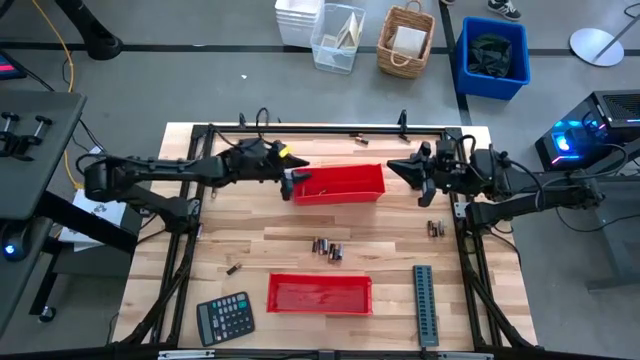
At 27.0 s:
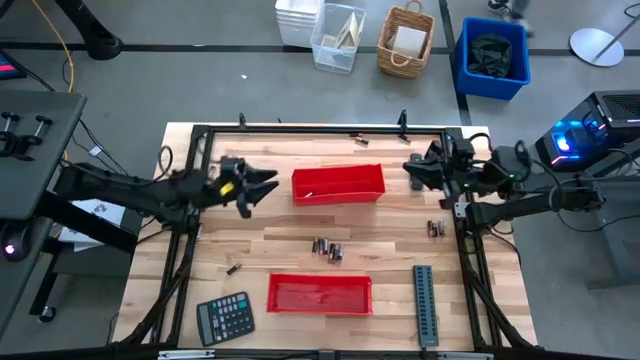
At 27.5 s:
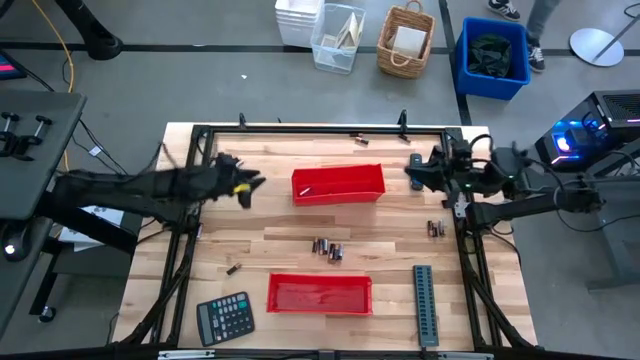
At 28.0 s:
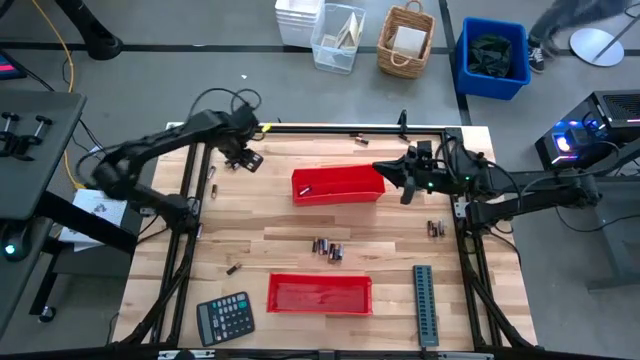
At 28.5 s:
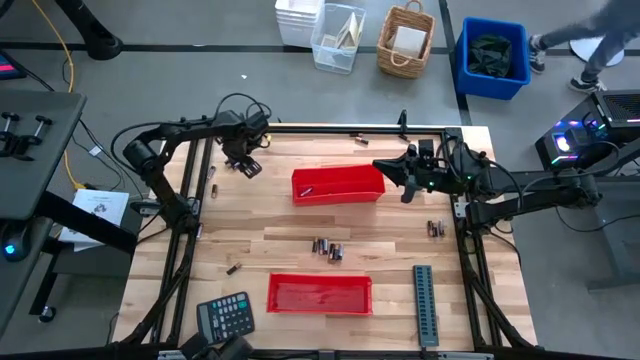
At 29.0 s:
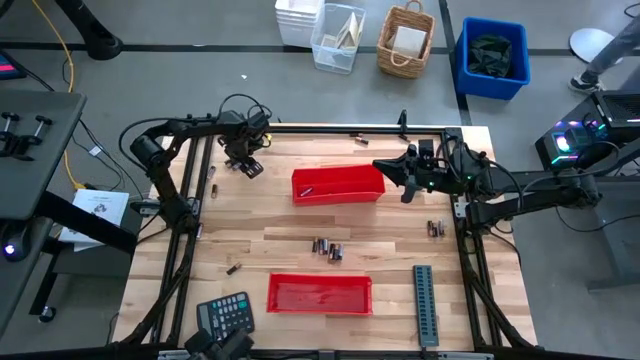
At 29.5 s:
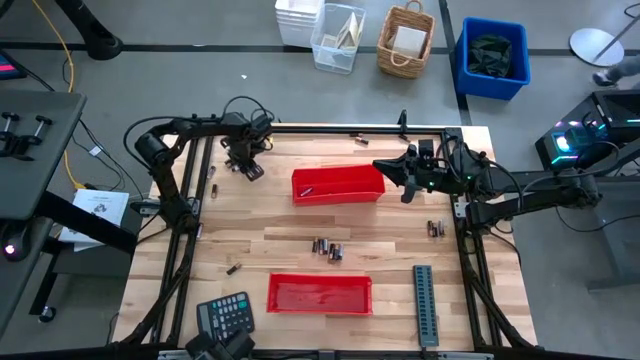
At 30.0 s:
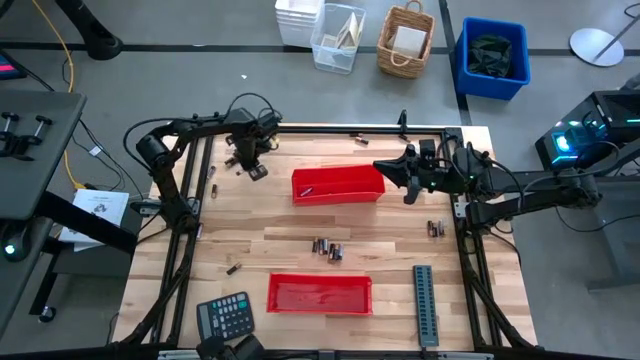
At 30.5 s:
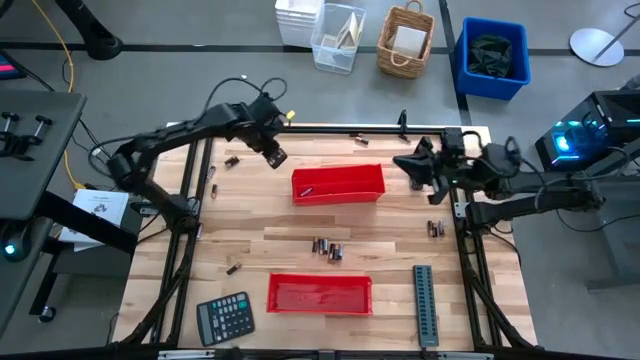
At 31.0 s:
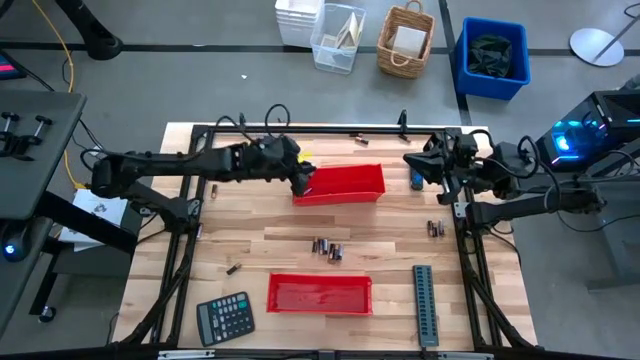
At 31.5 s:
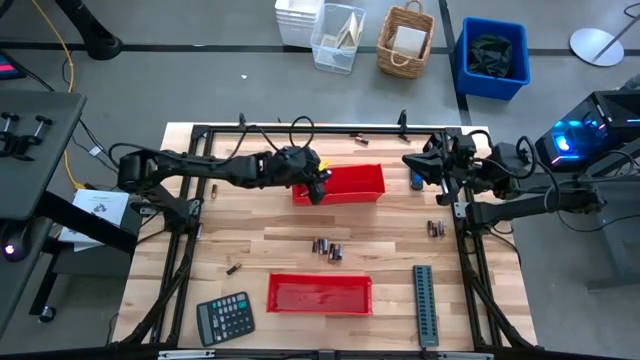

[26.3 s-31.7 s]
Task: Sort batteries
Put the silver battery into the top red bin

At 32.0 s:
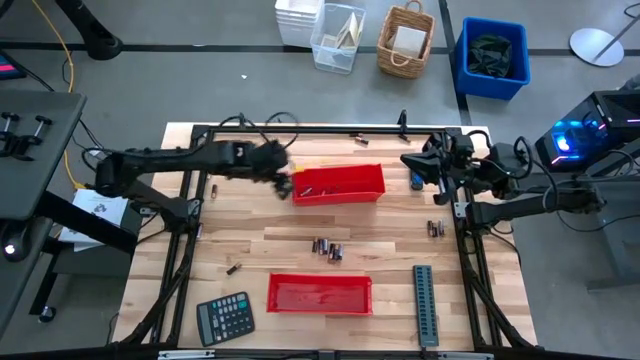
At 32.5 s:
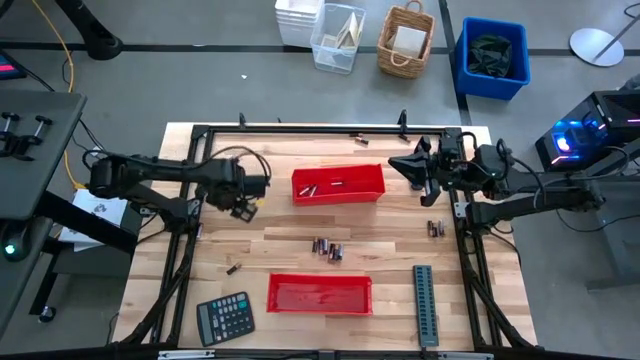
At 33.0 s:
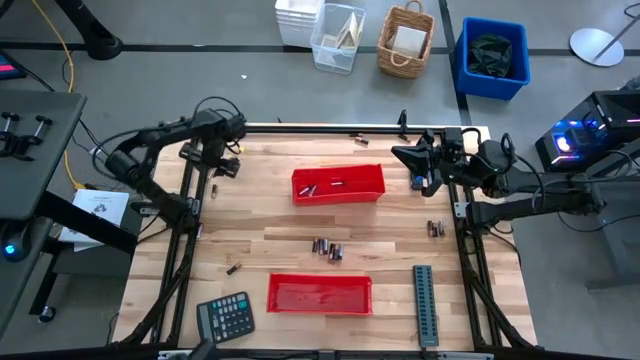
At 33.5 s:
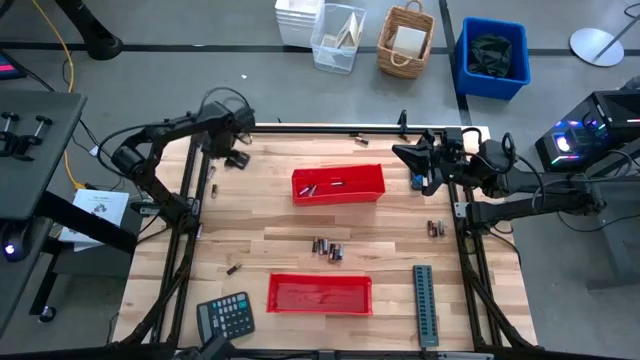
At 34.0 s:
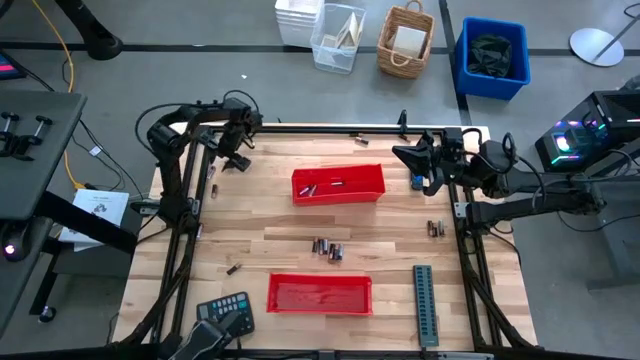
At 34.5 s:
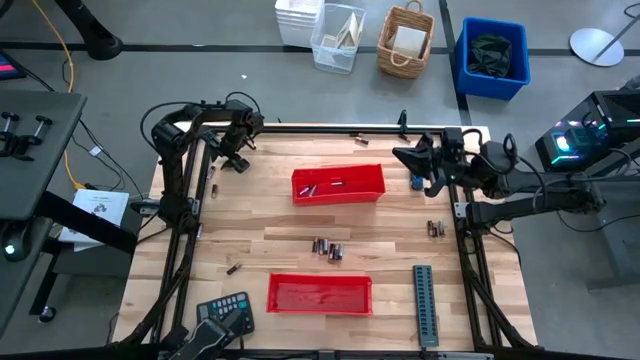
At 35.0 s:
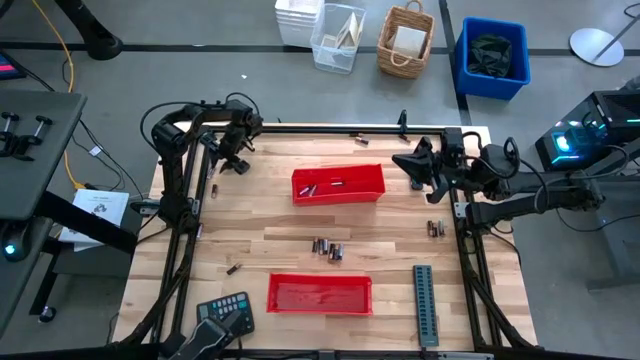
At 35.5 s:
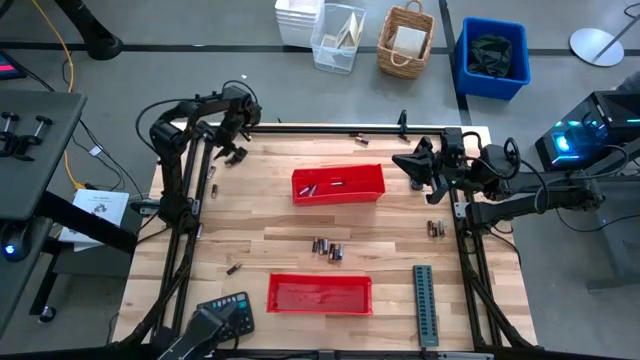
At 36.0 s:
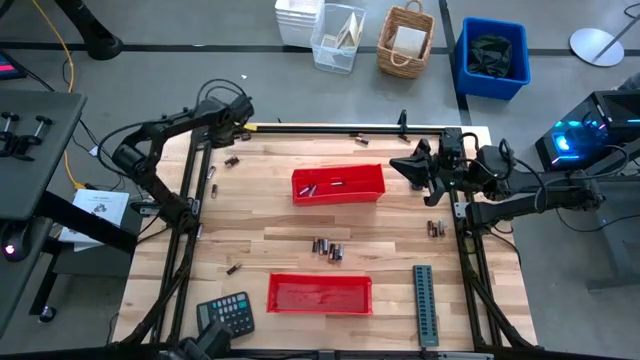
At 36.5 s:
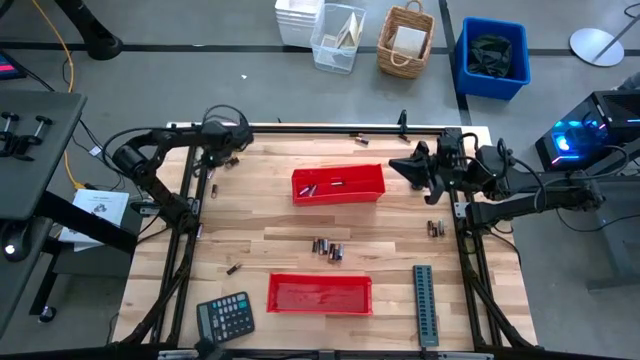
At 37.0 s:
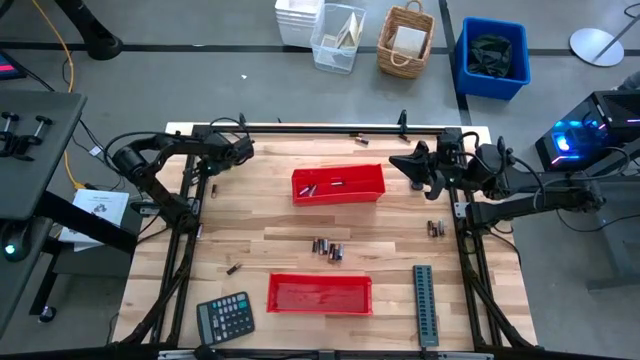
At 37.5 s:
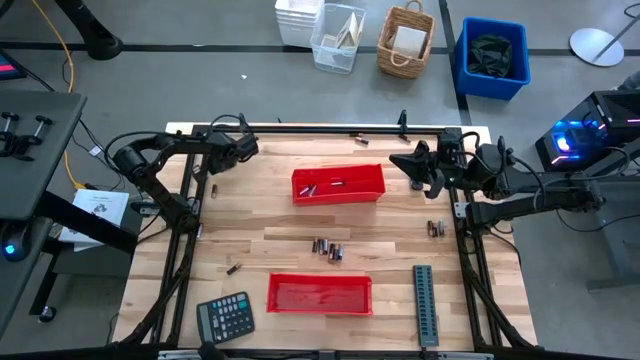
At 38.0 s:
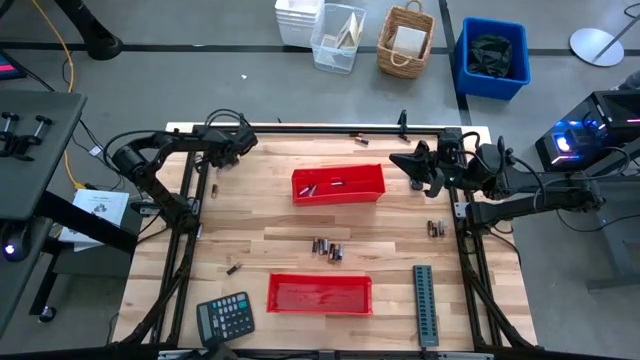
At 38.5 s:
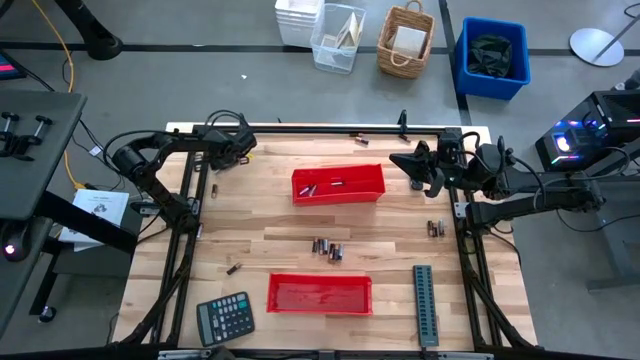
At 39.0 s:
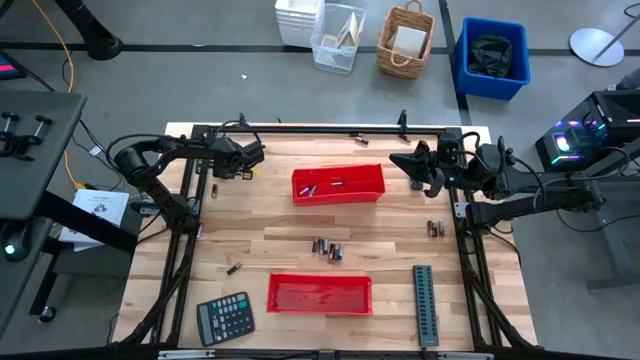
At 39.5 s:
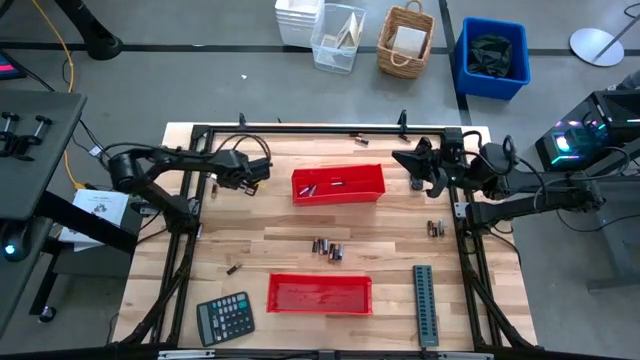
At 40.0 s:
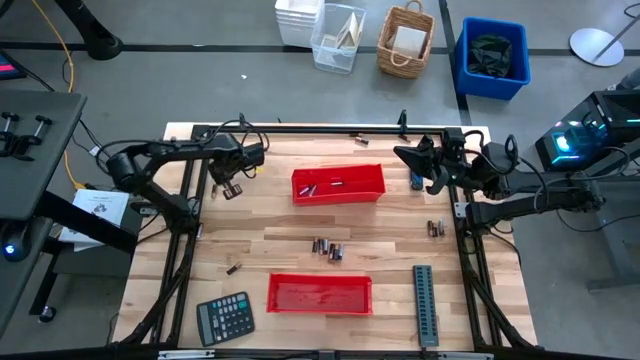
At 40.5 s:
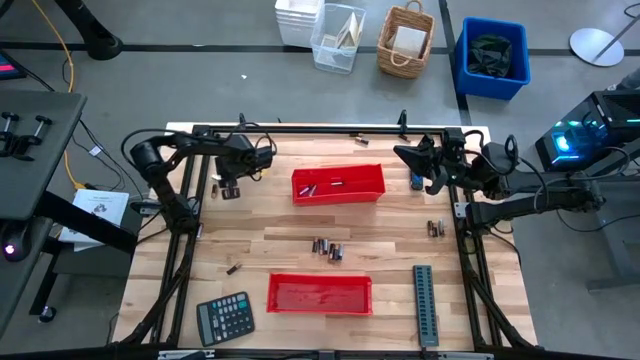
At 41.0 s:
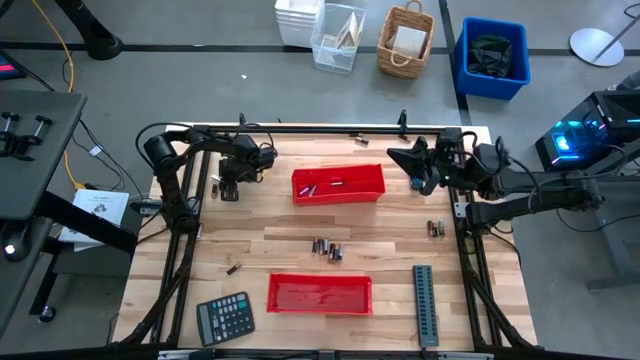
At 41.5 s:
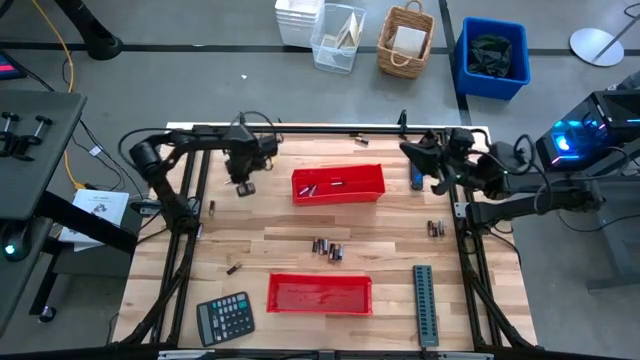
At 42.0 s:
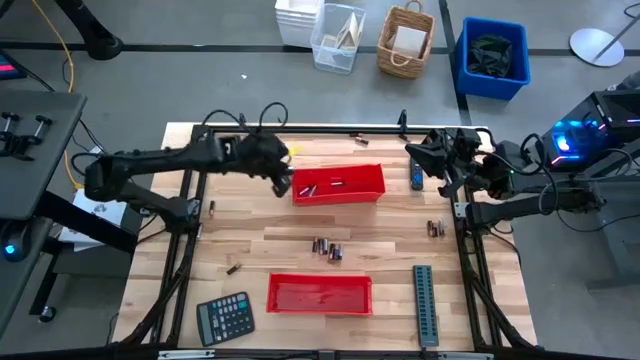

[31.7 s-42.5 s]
Put the silver battery into the top red bin

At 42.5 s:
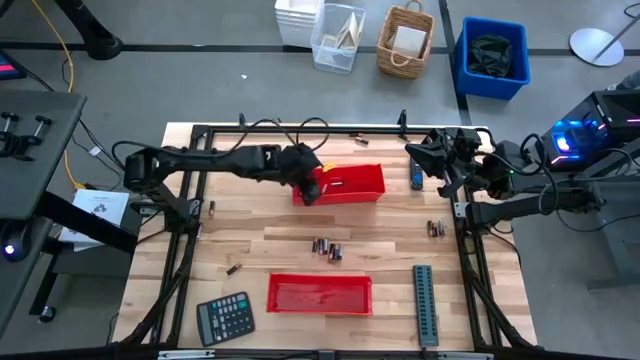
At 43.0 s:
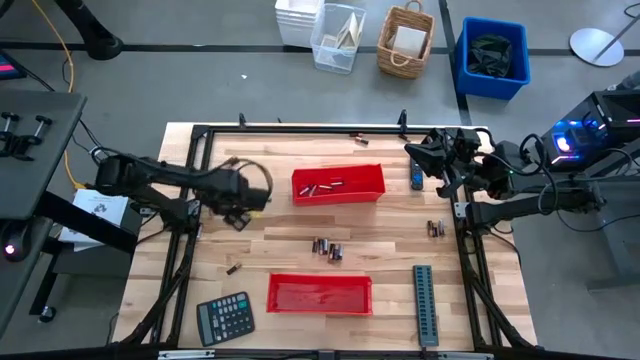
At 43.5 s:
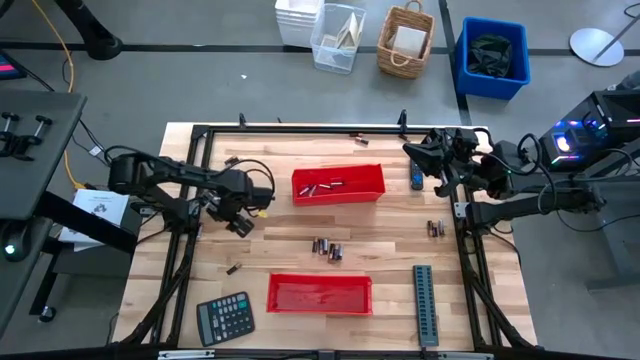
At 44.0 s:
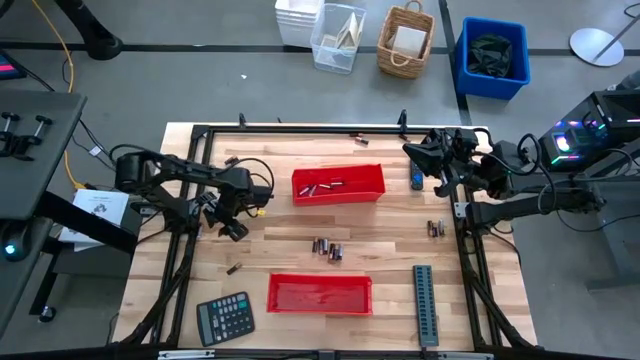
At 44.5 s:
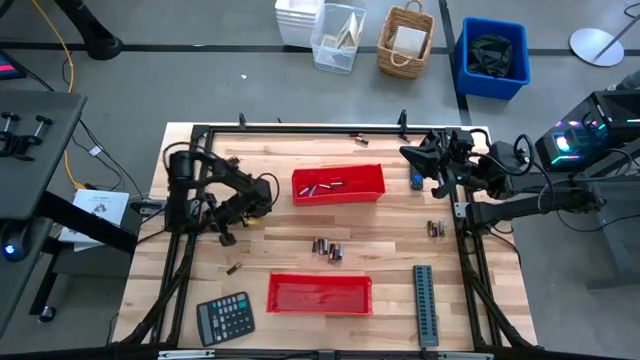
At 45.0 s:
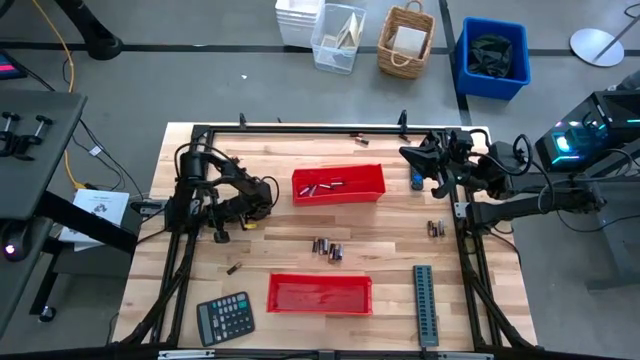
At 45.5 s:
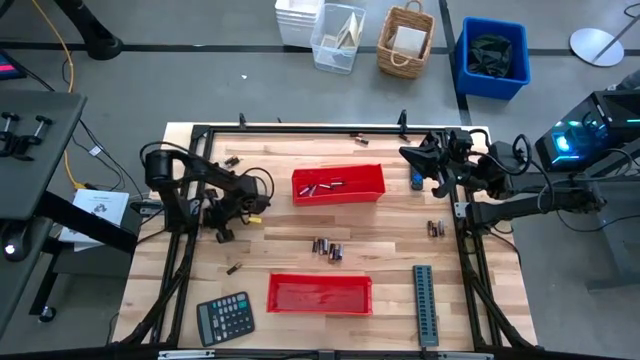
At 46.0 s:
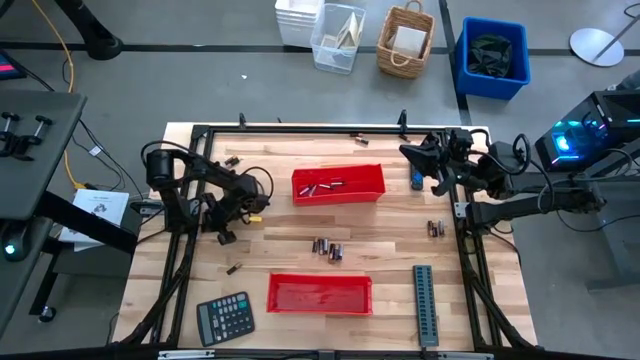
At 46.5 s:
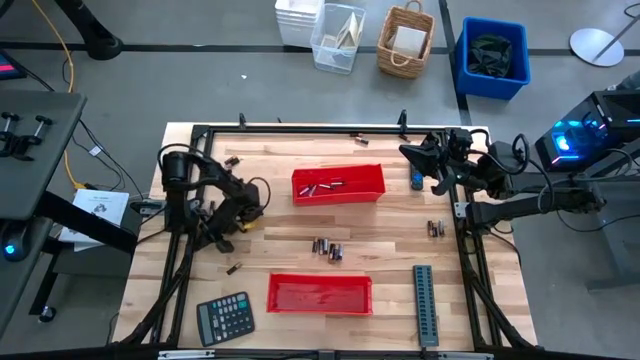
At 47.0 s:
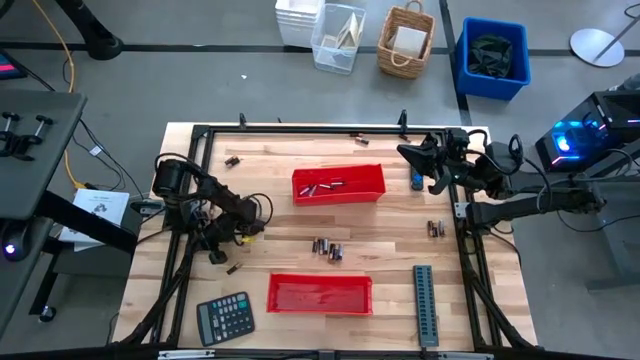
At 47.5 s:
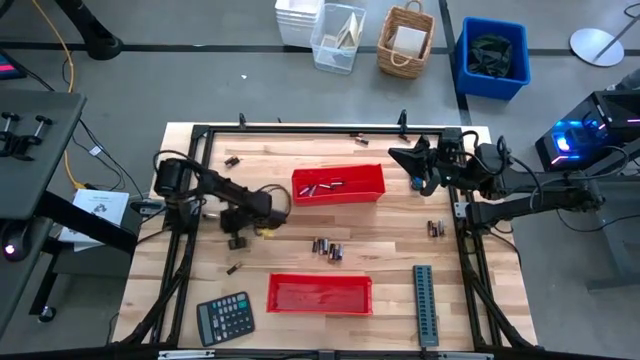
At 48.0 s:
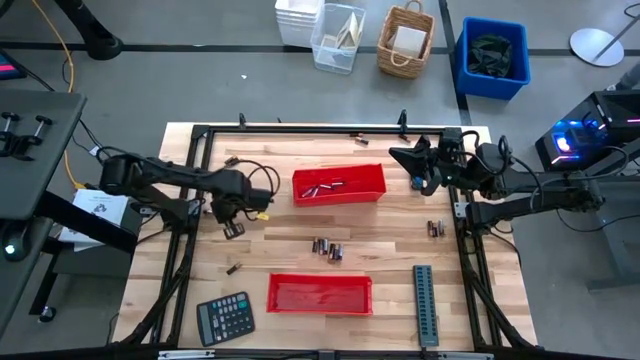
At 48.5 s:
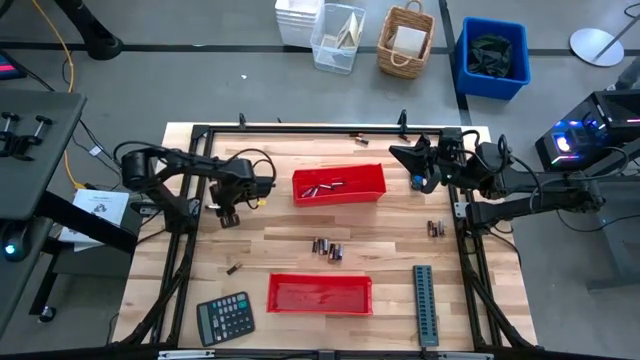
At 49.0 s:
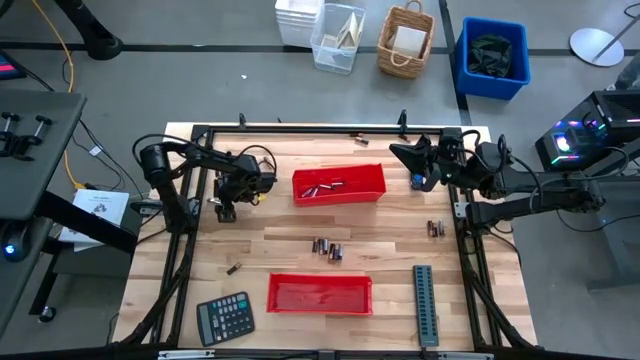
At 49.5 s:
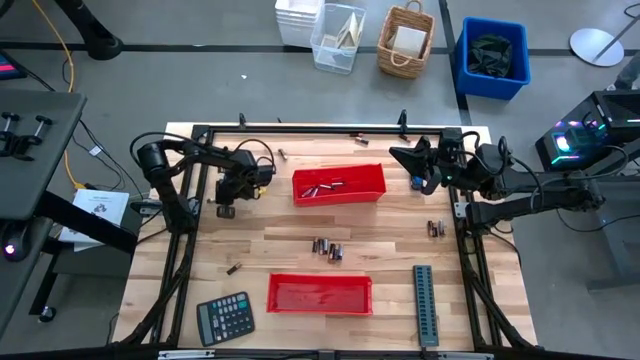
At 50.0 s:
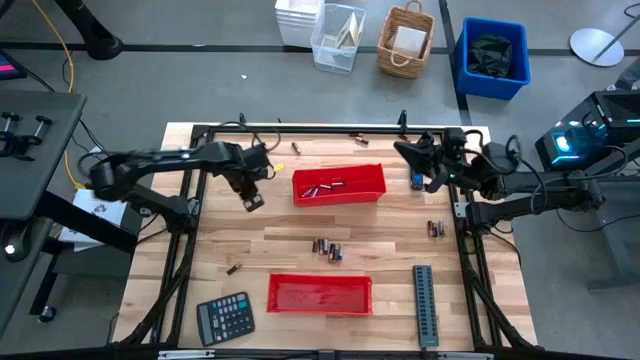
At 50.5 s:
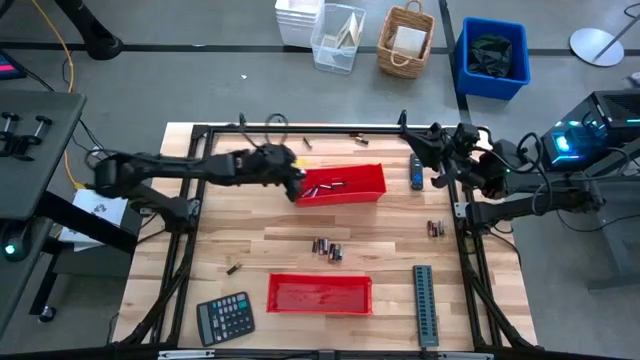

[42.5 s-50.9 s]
Put the silver battery into the top red bin
